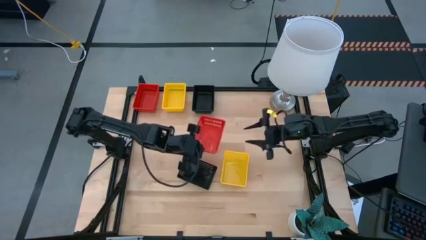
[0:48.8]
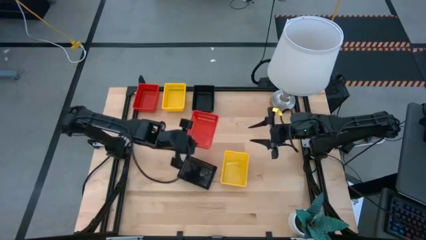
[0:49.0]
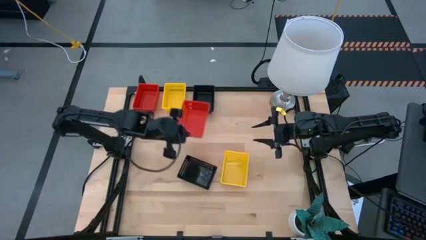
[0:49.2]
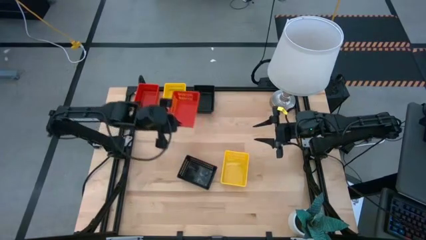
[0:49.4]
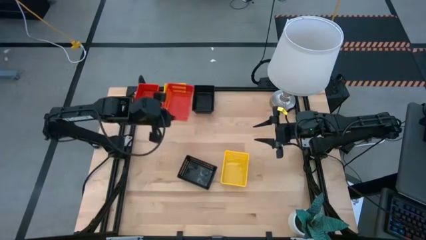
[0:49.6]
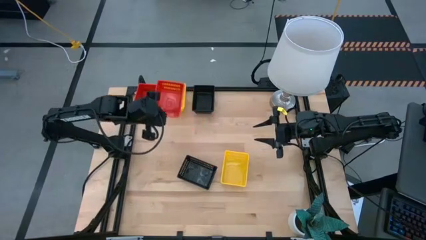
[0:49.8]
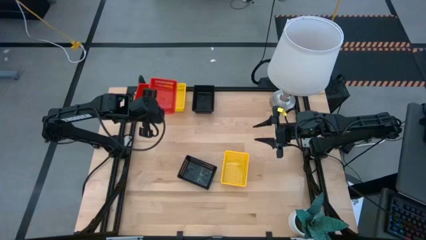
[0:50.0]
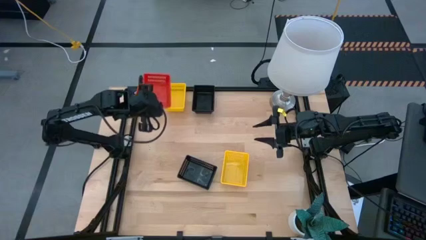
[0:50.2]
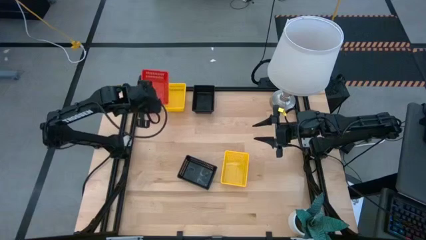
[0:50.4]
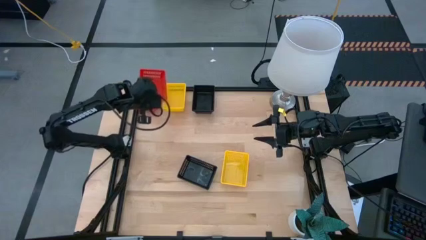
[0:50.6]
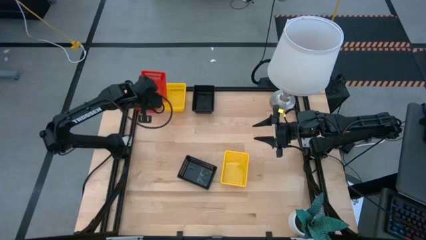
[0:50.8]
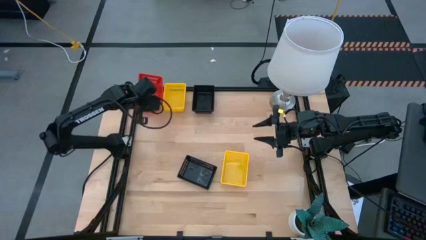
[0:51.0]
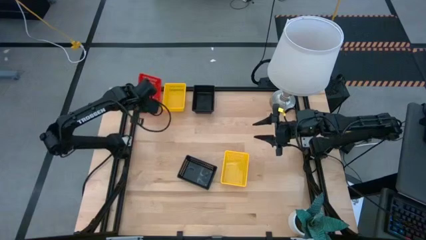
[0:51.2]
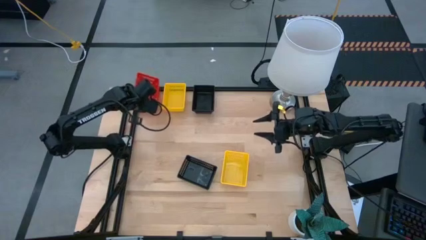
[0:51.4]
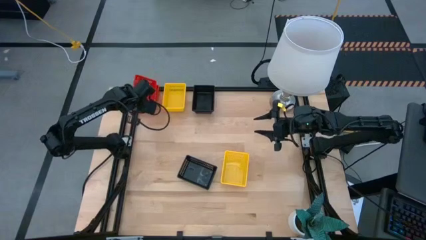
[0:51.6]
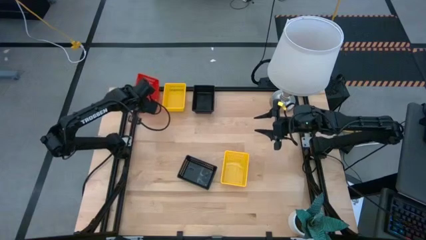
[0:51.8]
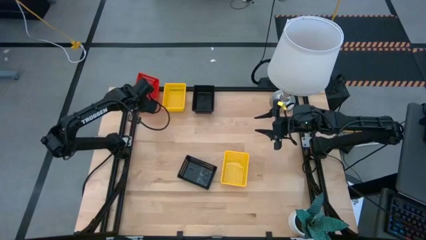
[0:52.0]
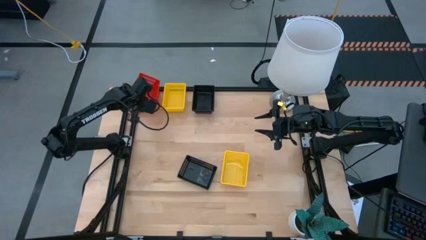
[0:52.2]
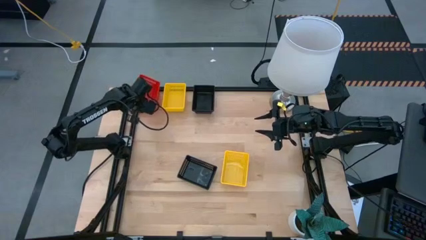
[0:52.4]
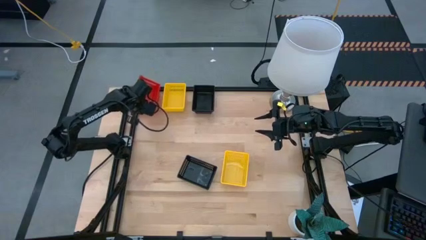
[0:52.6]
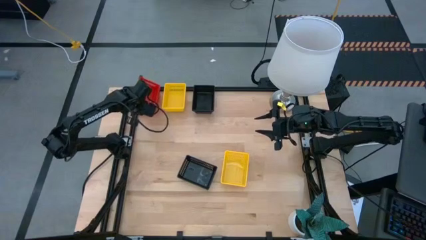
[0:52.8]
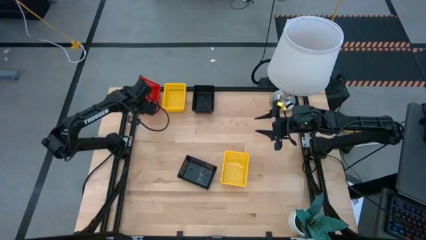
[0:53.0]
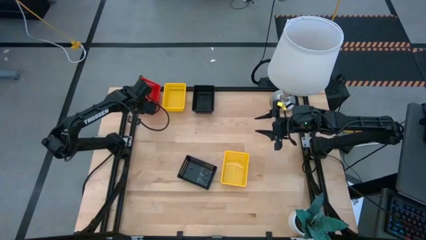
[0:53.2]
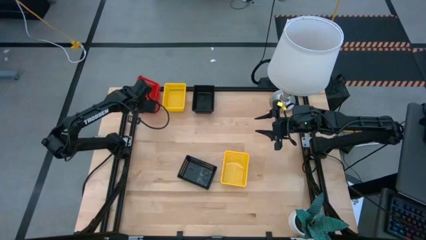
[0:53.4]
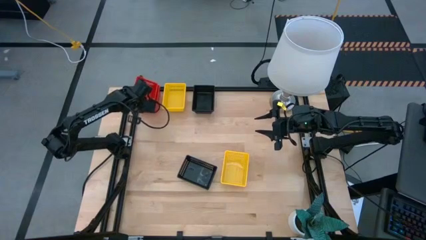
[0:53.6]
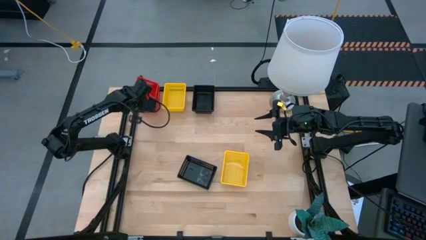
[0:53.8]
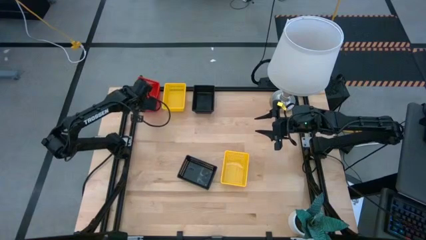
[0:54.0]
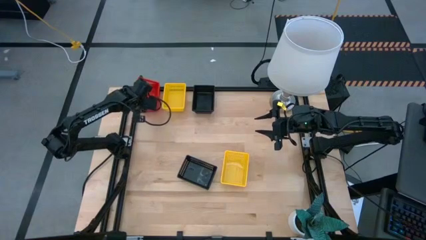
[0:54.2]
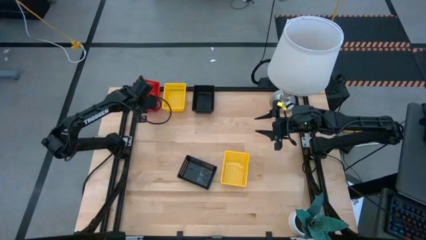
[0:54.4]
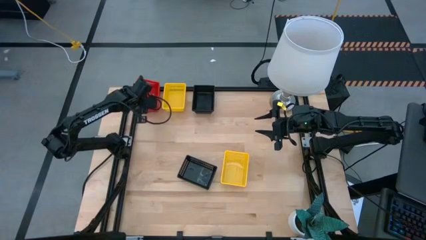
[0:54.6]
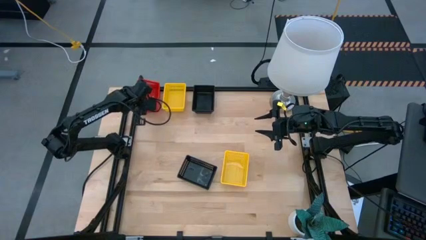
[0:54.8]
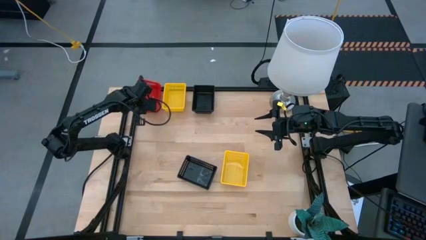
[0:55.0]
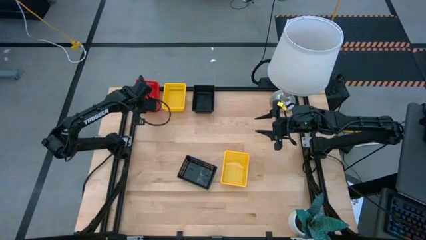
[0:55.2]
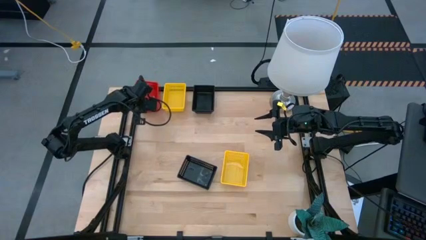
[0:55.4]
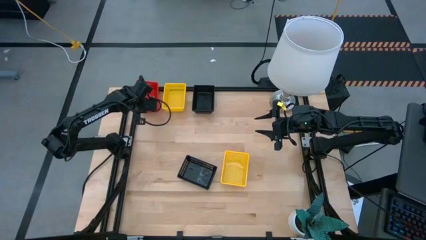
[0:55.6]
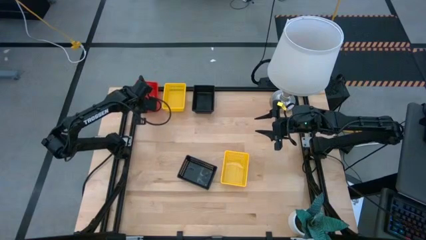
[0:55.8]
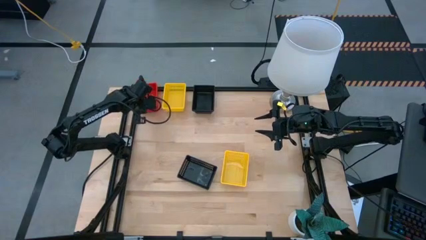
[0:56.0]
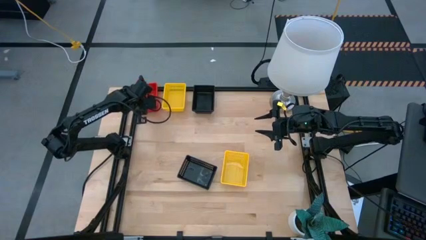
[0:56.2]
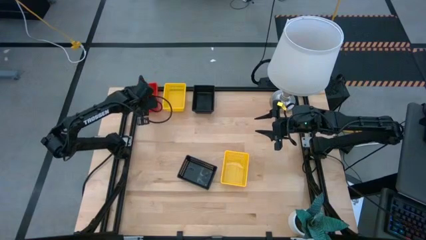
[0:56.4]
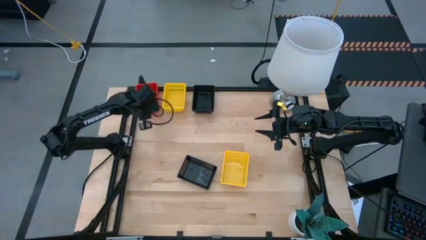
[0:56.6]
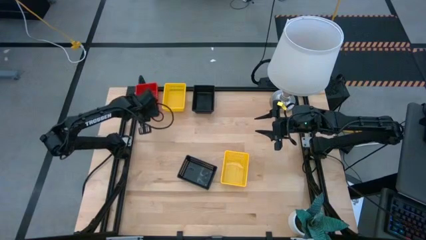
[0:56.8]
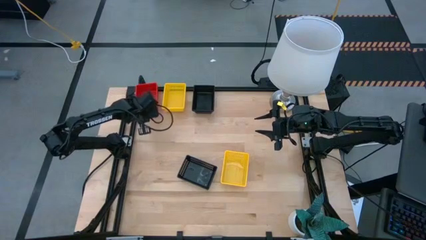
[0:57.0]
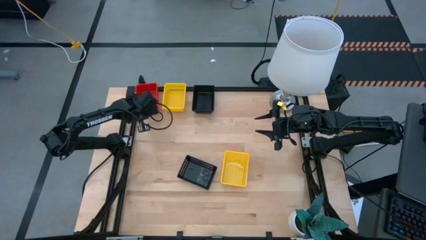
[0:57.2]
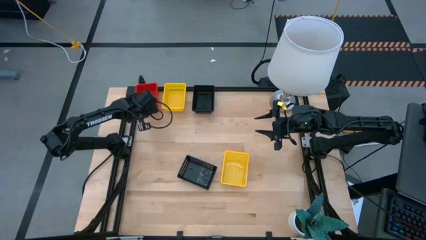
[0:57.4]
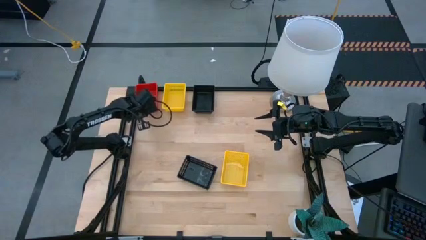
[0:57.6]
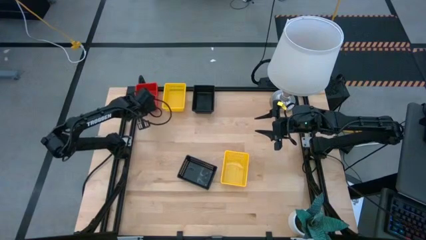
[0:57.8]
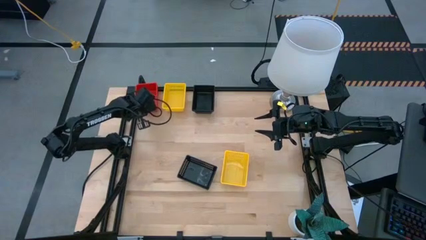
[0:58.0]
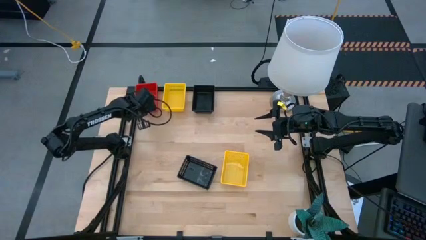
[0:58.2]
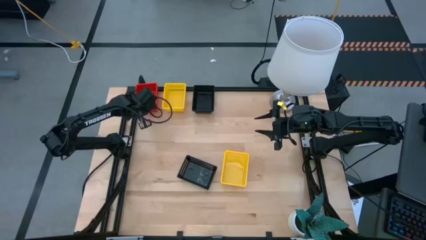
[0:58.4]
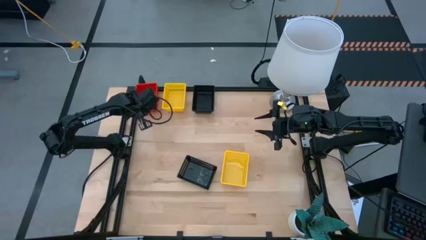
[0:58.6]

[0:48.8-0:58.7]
Stack the bottom red bin on top of the top red bin

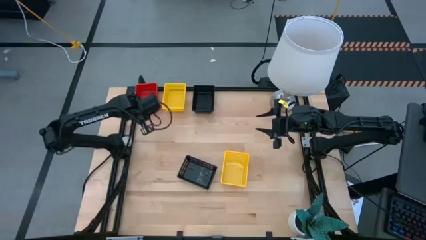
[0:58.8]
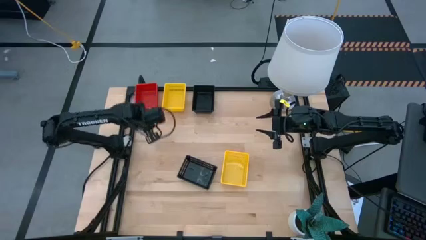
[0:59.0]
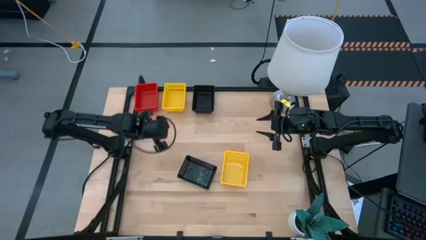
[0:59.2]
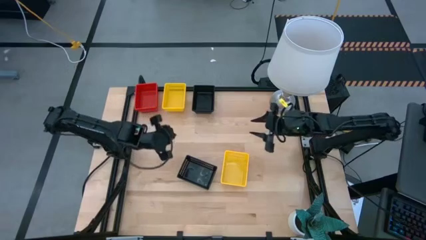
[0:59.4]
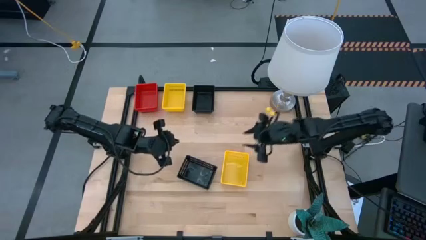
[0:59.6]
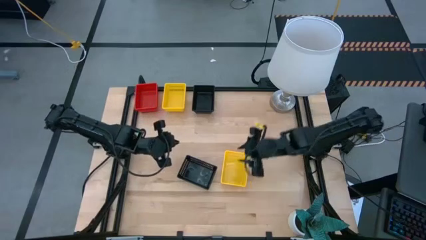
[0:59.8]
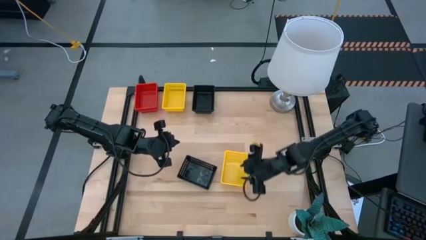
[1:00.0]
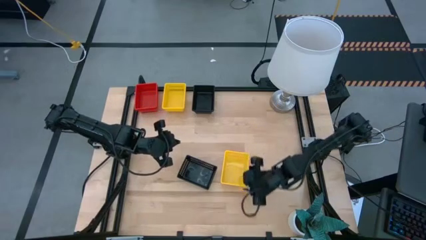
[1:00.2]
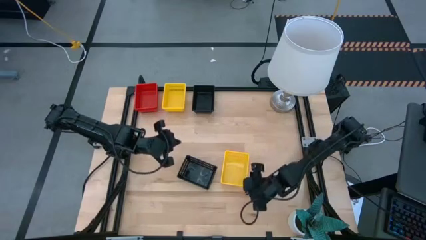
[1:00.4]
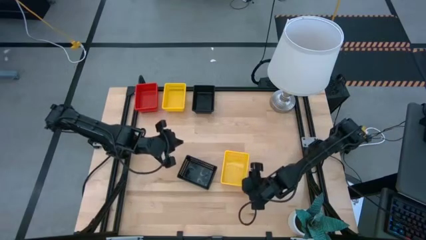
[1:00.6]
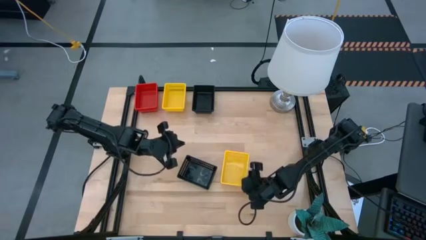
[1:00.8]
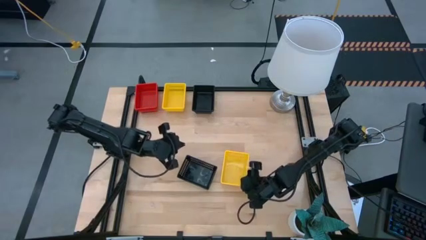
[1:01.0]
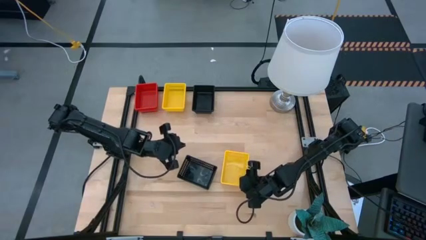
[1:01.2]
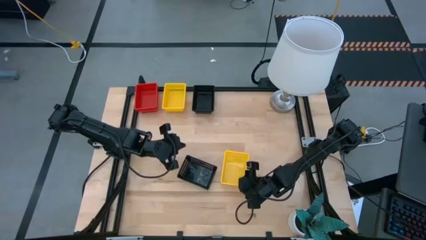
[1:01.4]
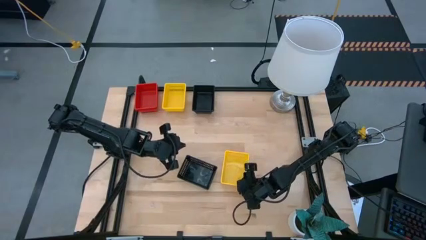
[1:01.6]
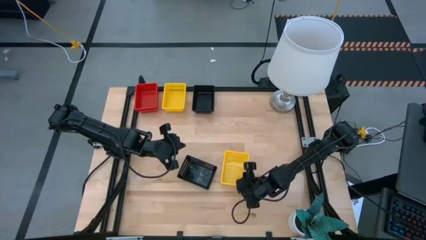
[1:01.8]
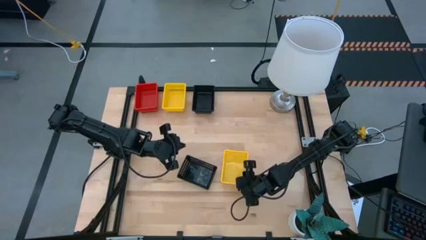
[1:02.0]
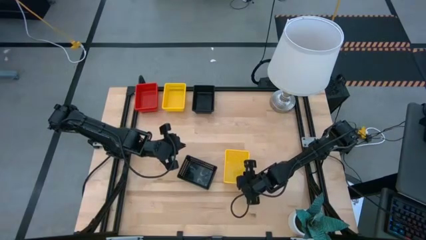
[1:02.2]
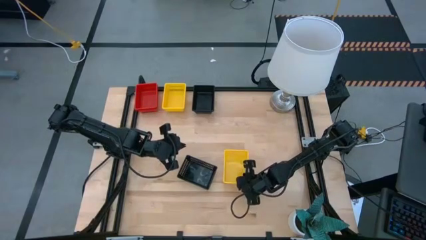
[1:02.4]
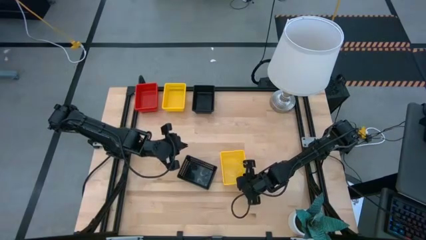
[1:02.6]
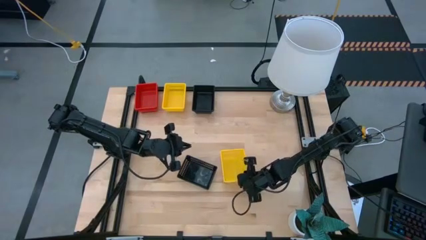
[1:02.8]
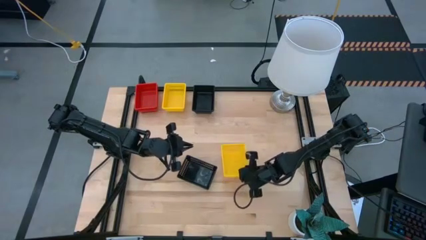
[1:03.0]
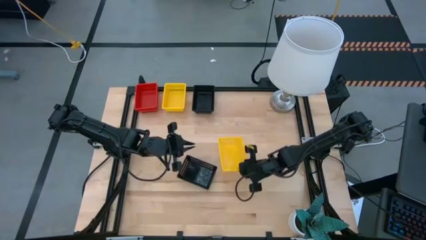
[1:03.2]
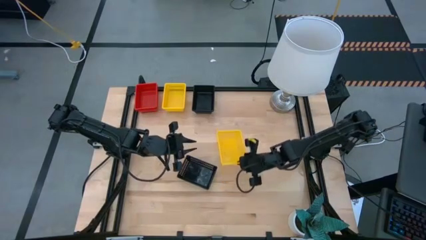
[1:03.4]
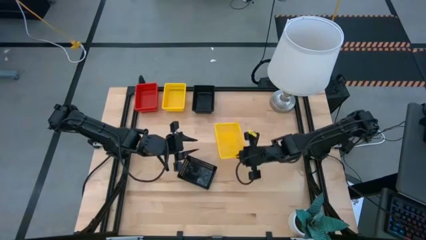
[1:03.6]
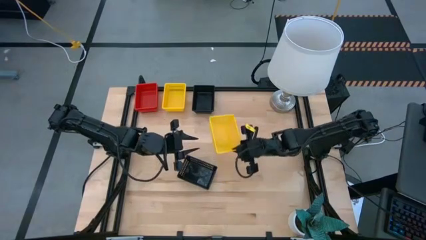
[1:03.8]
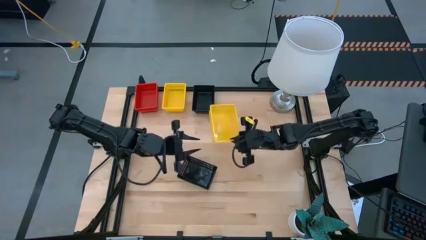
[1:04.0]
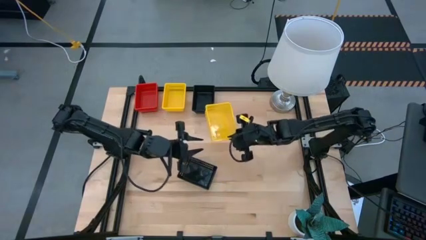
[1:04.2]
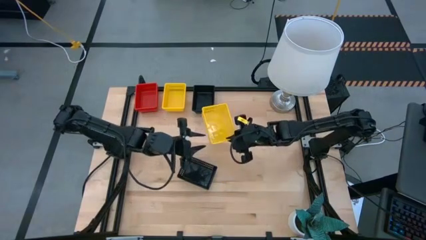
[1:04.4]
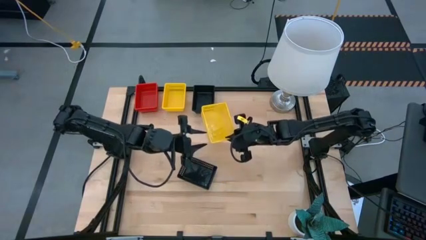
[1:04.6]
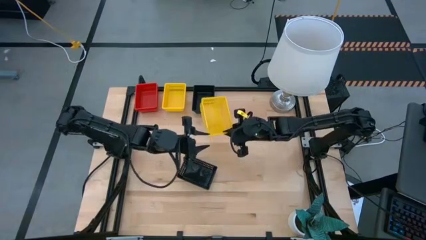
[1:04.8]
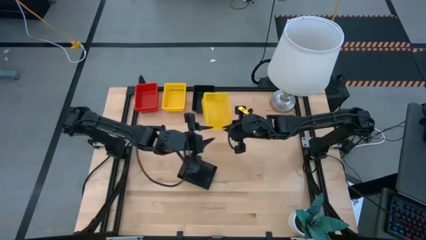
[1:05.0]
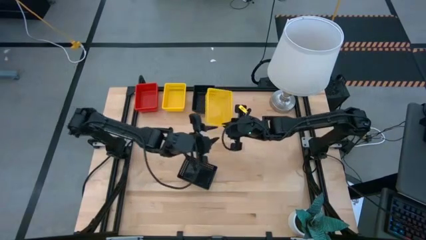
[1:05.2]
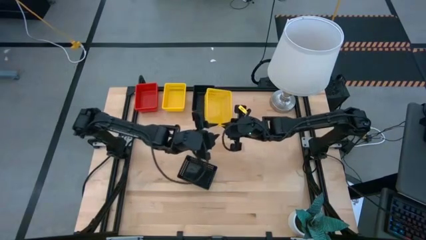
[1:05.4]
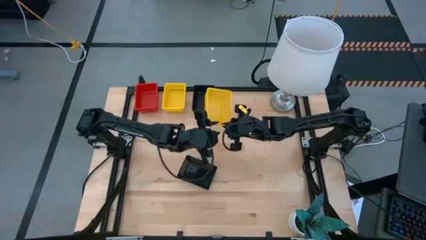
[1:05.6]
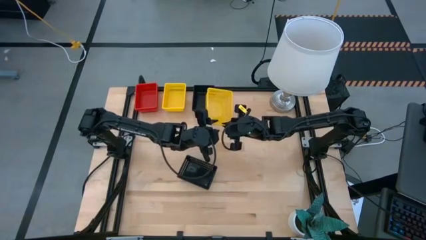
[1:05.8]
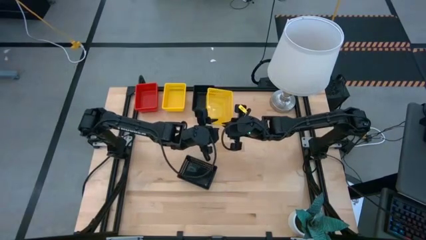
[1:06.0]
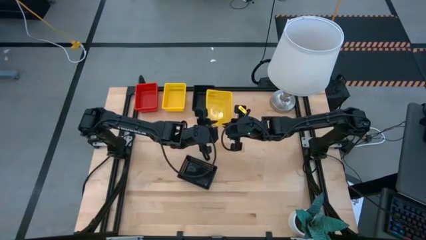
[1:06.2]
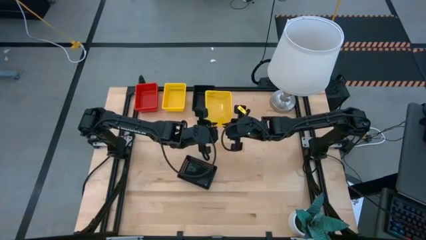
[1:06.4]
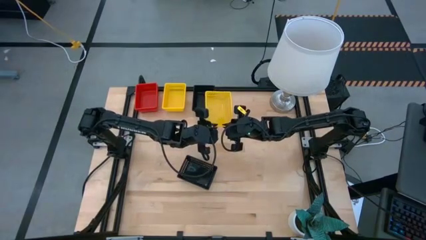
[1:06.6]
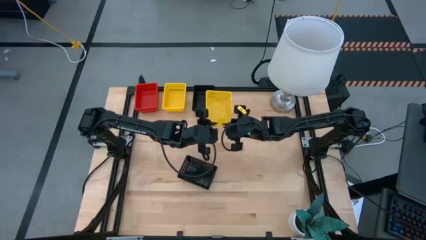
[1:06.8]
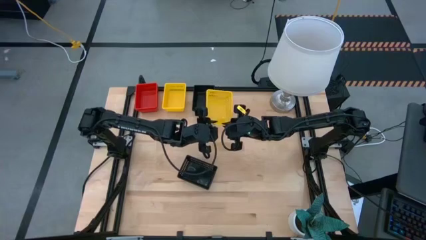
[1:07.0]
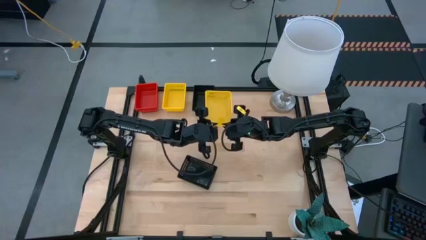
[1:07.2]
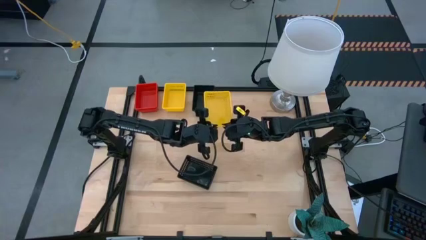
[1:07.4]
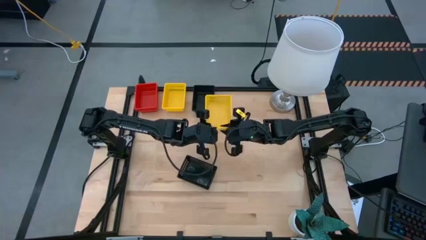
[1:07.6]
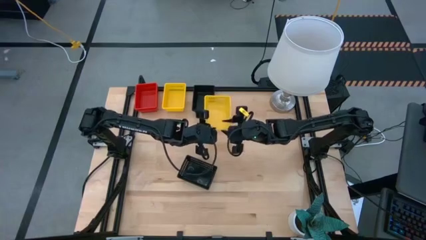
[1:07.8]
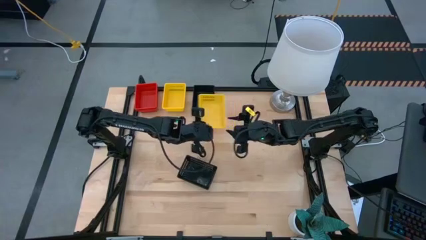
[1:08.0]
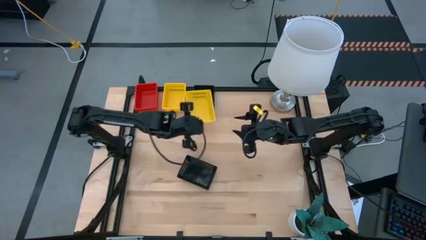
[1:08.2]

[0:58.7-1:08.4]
Stack the bottom yellow bin on top of the top yellow bin
